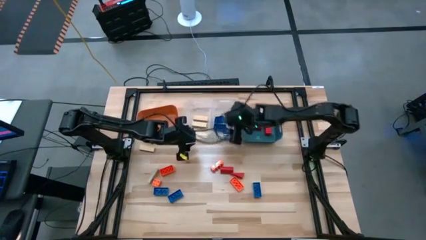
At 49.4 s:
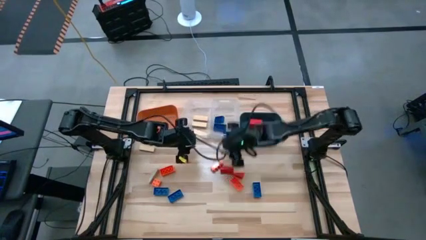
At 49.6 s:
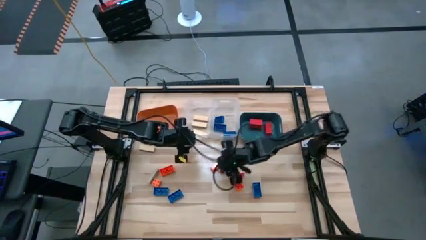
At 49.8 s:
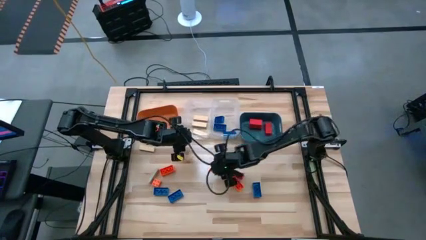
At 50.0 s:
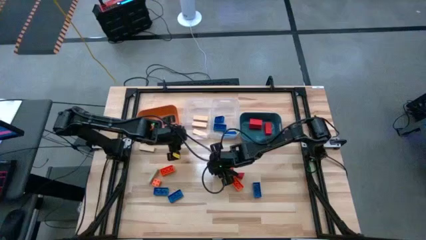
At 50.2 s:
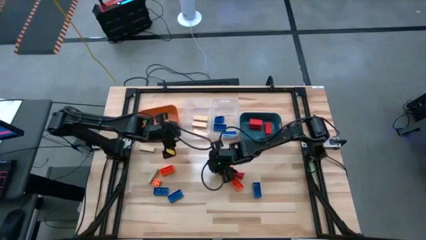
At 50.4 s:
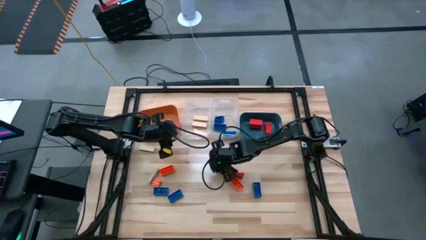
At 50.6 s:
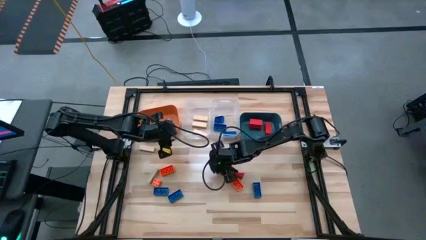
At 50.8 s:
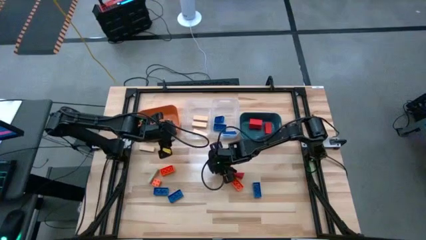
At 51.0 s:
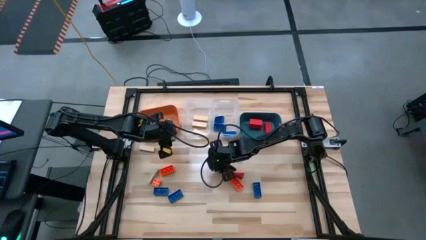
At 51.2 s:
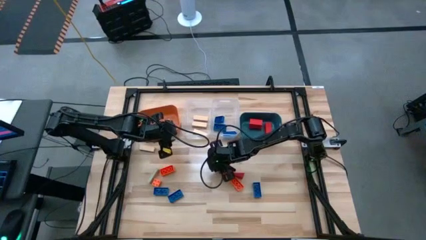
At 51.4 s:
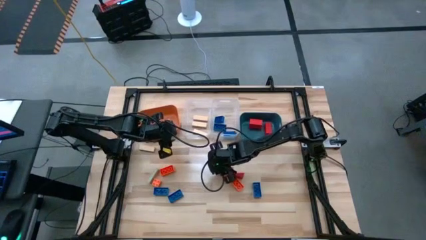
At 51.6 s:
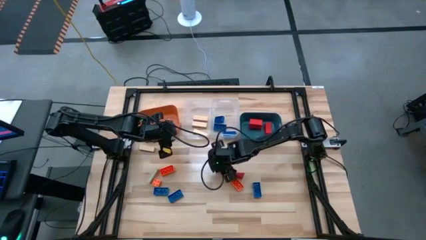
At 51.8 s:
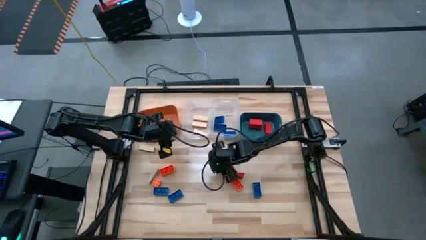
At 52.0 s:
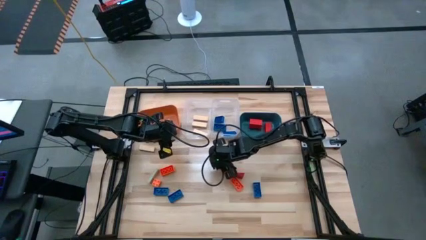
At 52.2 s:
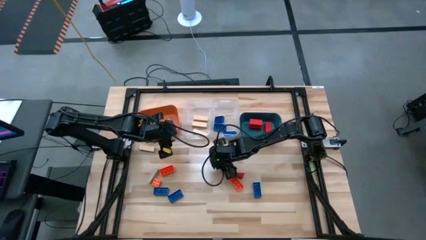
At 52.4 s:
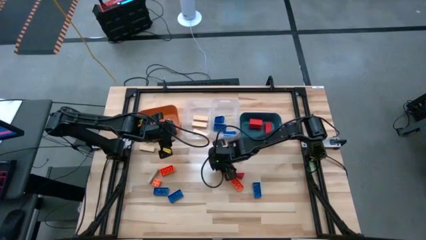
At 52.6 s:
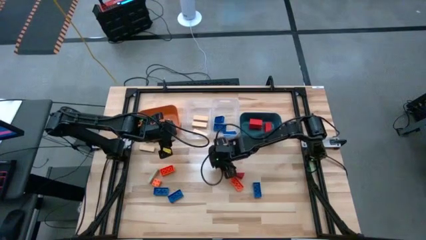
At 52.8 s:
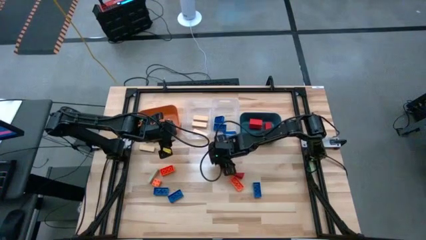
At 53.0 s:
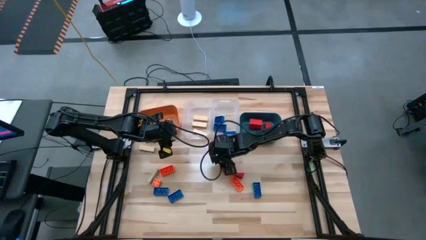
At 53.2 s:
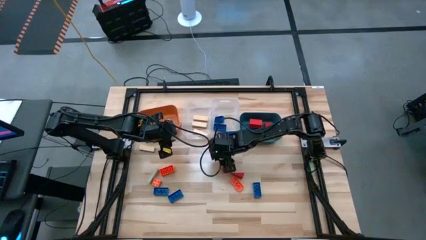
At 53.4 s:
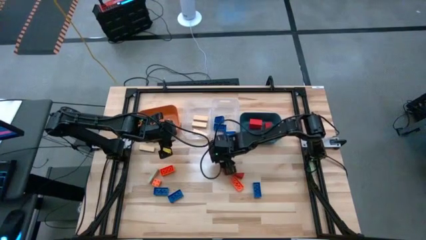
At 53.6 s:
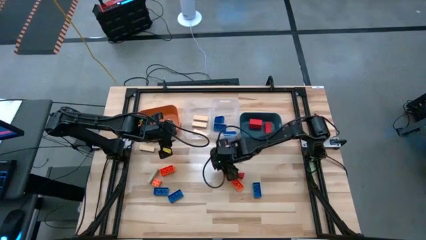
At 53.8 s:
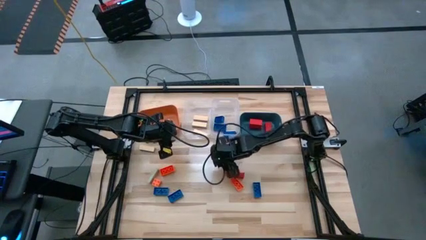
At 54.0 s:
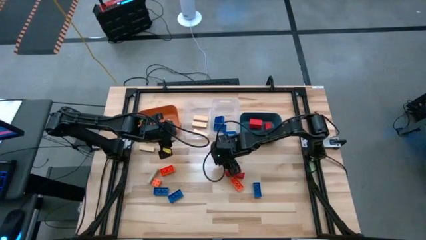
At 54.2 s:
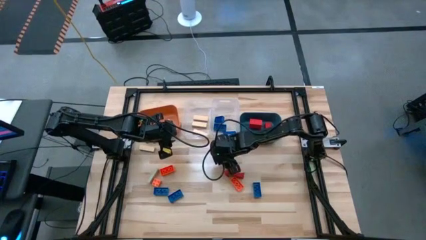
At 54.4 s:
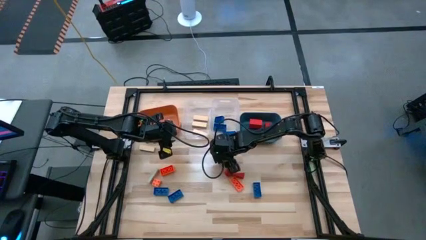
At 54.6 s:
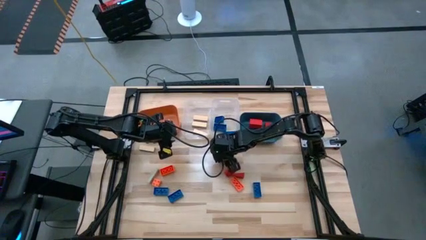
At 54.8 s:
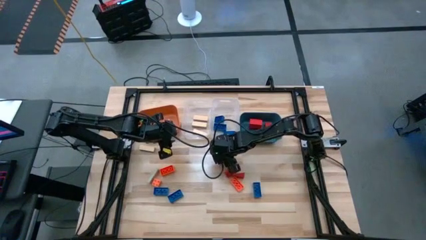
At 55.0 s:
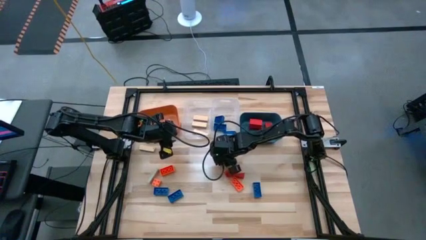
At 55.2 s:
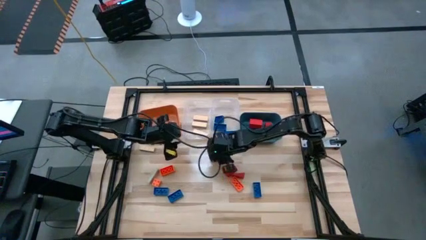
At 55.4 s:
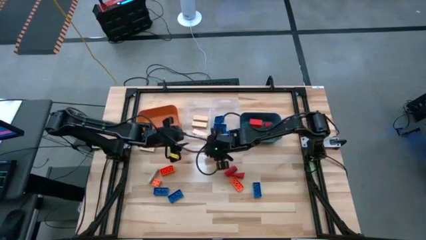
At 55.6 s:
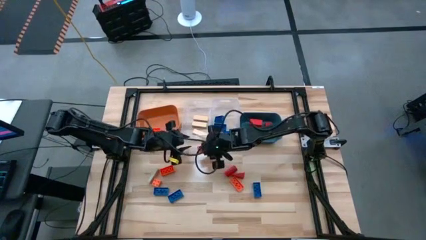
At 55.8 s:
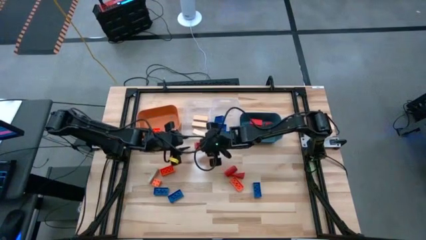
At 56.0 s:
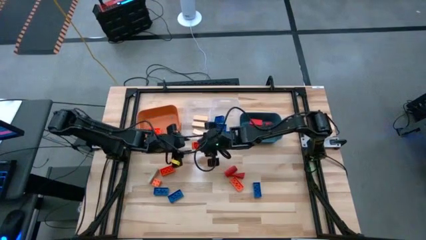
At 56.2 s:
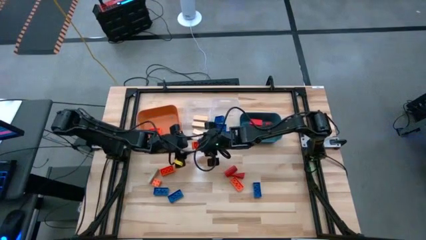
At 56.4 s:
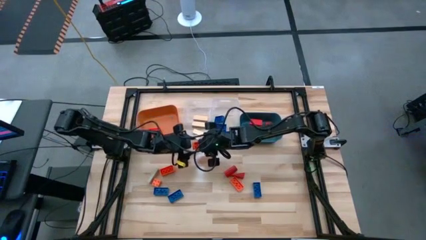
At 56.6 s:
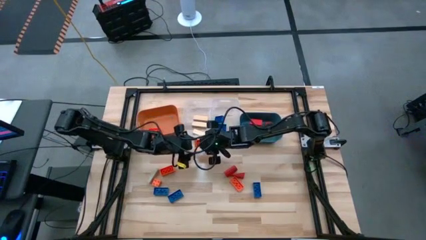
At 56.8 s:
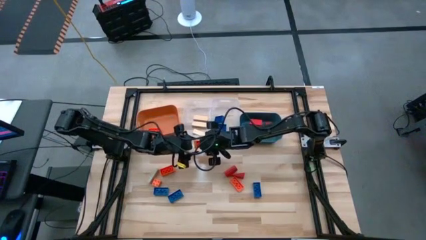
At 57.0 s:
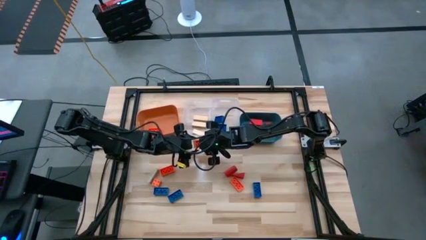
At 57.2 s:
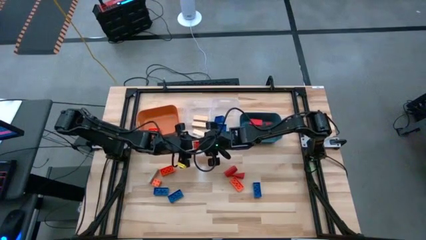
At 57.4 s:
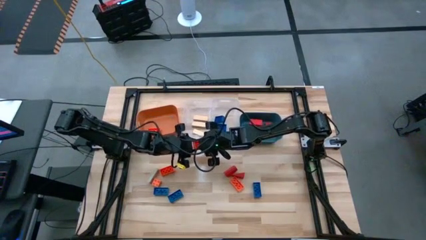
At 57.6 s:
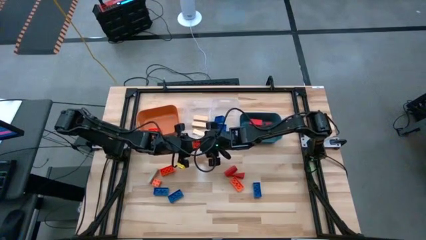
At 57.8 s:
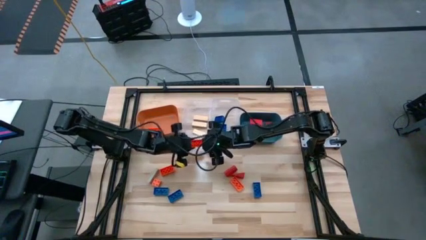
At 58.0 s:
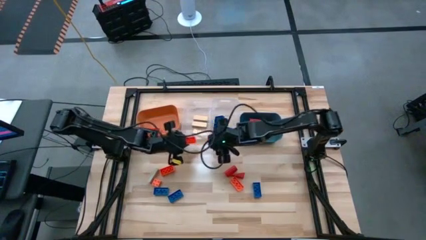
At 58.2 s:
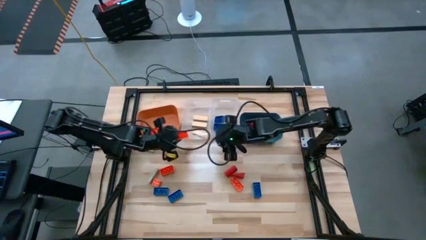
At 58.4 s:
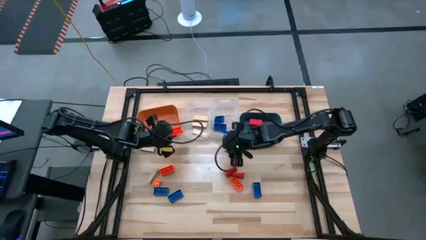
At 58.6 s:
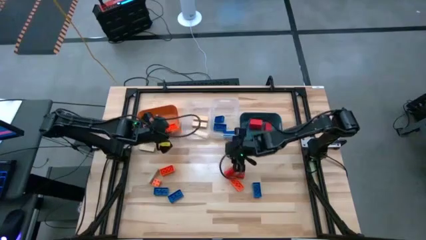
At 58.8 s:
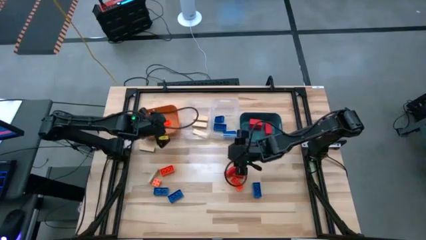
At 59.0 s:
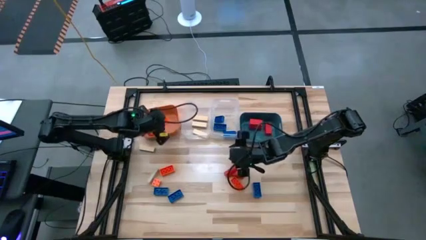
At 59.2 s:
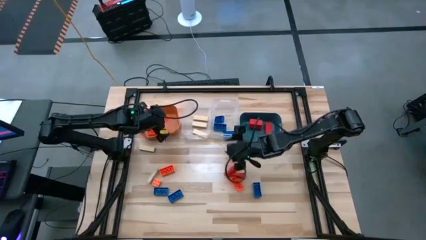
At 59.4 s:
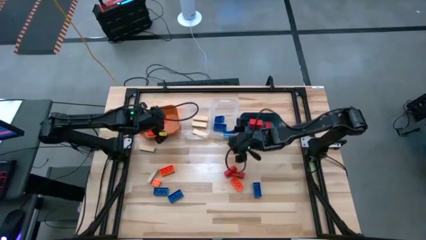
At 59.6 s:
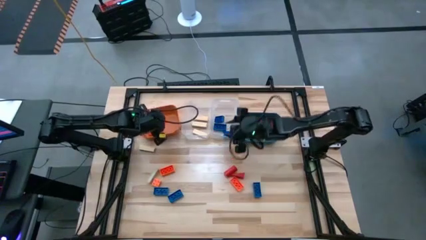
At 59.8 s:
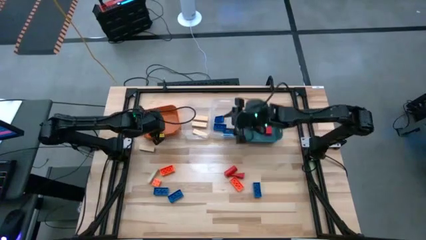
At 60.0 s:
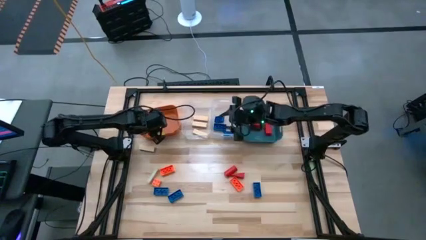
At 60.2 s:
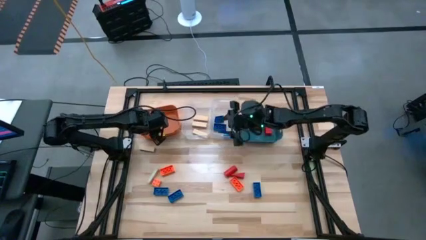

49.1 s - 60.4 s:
Task: Sort blocks
Put the orange game piece into the orange bin

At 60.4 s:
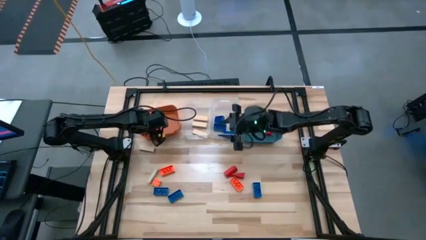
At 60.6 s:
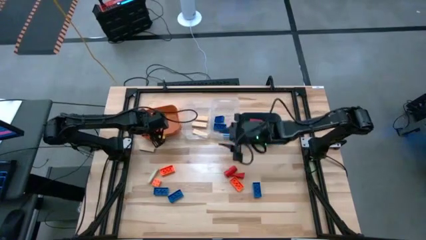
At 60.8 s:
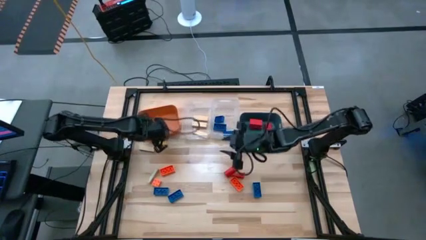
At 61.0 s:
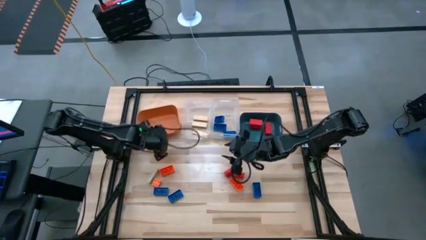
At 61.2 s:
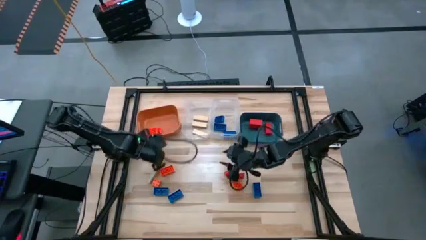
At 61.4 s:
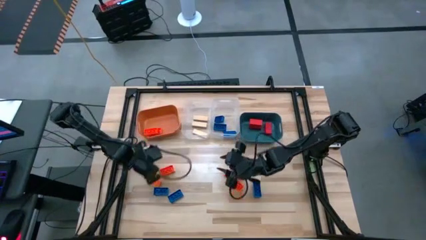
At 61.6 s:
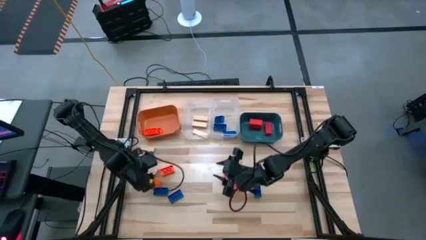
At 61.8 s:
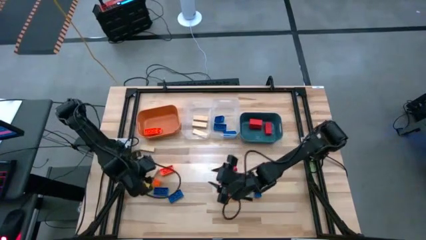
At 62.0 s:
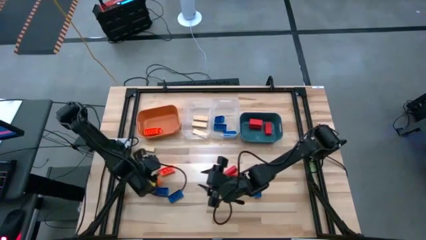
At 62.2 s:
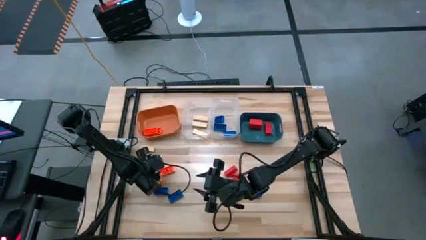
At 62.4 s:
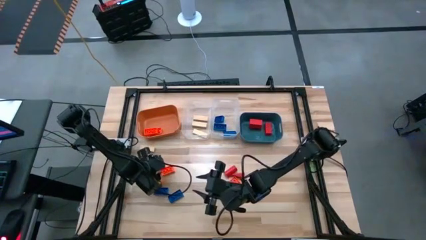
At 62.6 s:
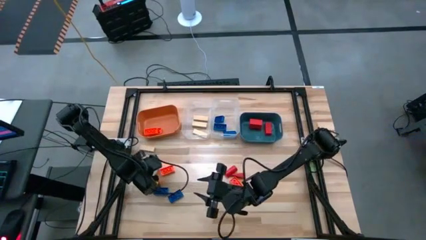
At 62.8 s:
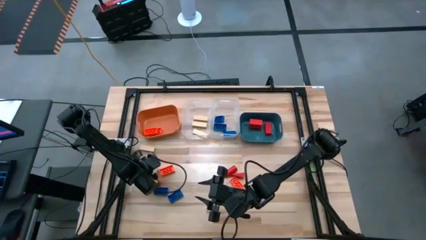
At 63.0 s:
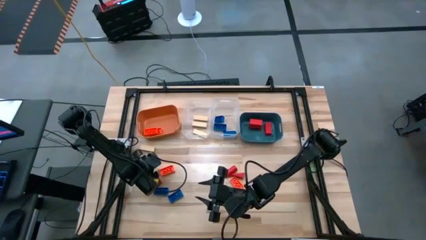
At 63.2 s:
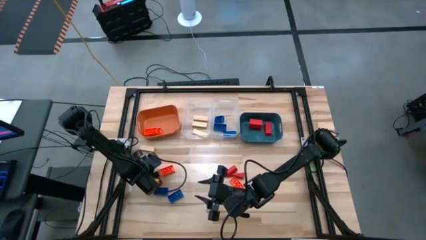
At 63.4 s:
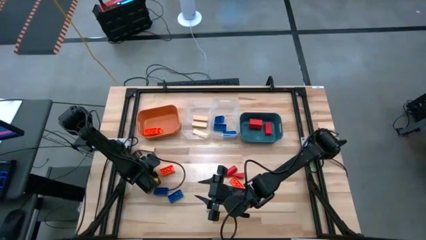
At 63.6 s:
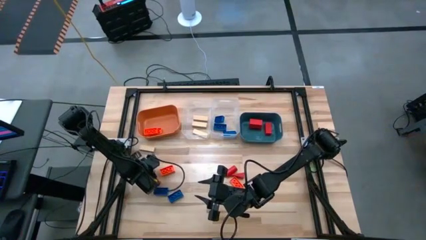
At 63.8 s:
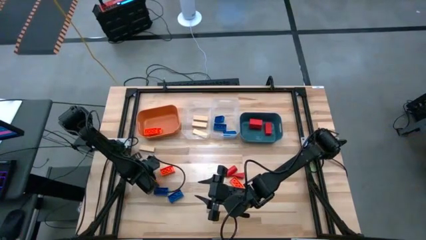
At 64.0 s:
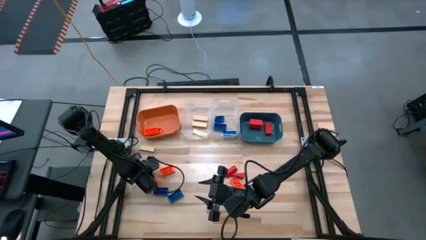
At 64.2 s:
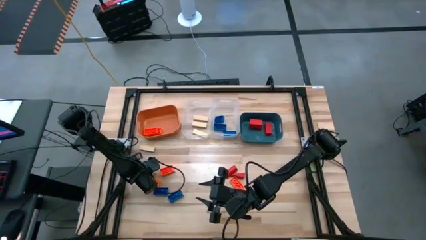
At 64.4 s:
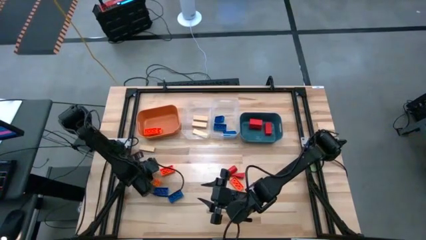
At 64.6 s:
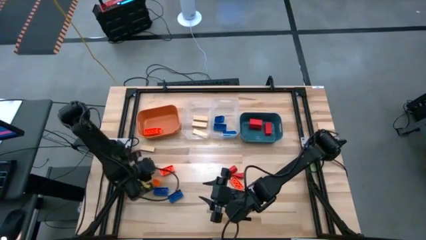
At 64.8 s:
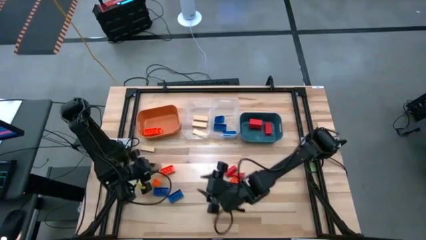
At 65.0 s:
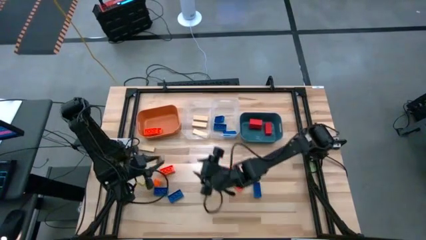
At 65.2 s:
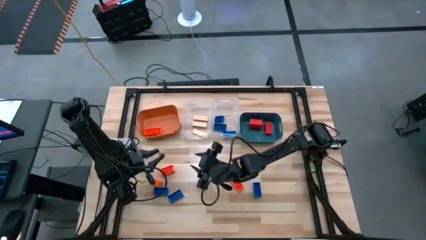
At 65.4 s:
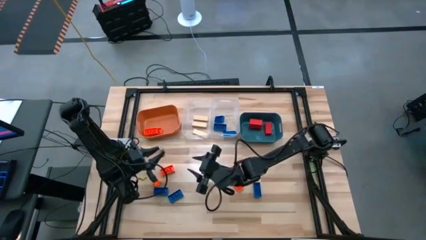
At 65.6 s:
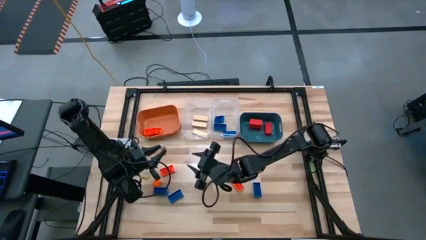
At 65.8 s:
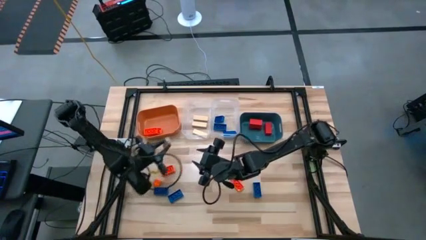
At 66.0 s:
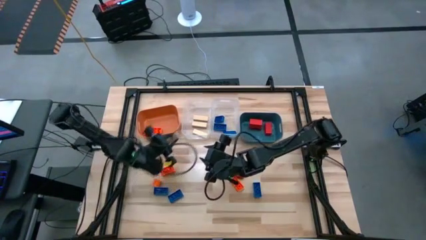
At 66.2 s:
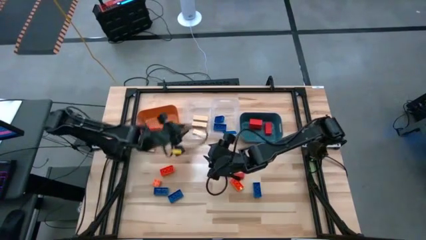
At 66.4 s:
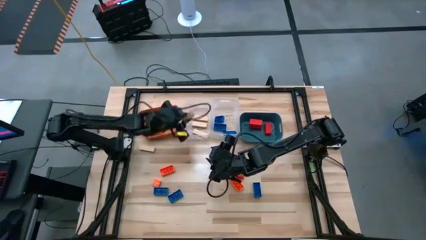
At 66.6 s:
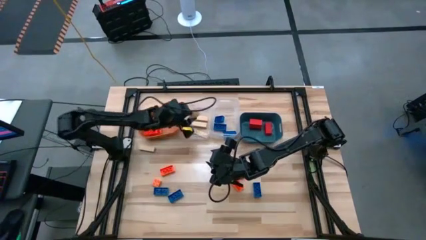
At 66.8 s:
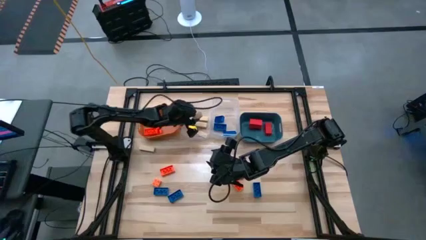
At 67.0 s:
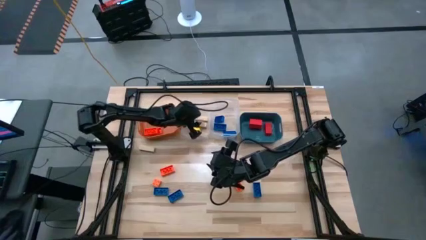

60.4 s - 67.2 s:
Put the brown block into the left transparent bin
